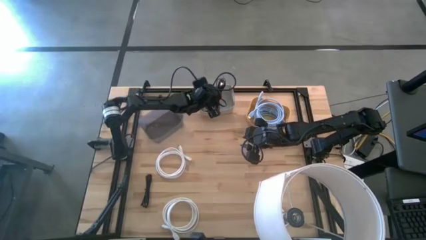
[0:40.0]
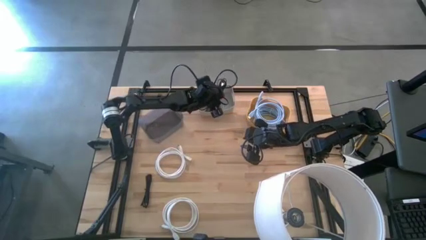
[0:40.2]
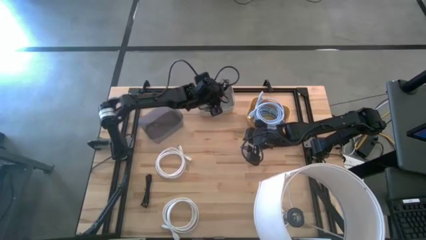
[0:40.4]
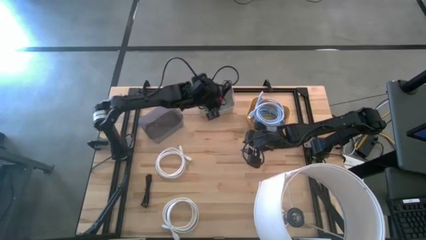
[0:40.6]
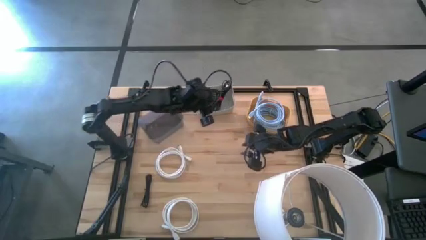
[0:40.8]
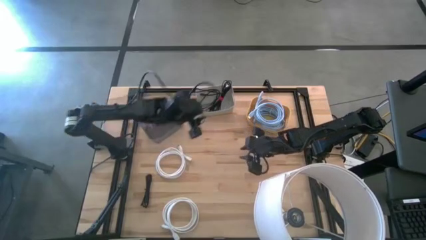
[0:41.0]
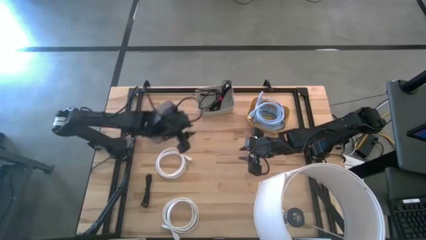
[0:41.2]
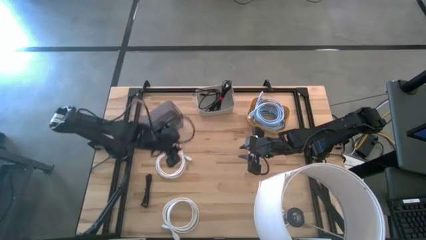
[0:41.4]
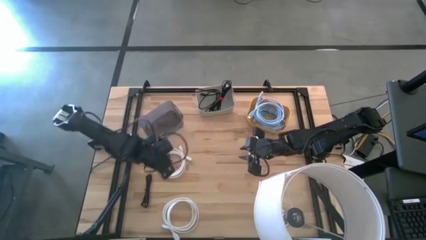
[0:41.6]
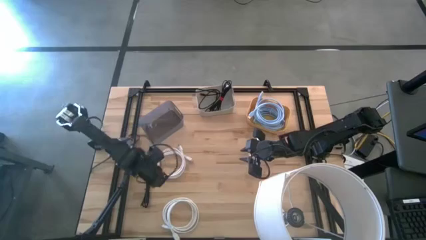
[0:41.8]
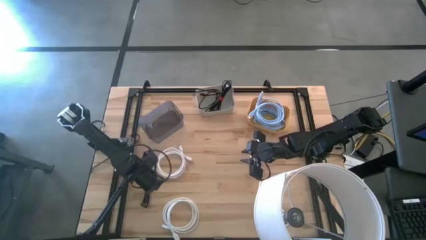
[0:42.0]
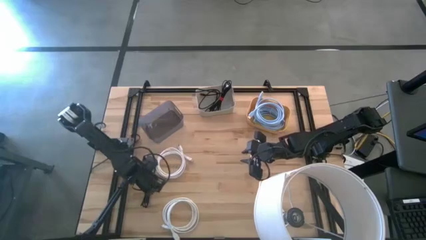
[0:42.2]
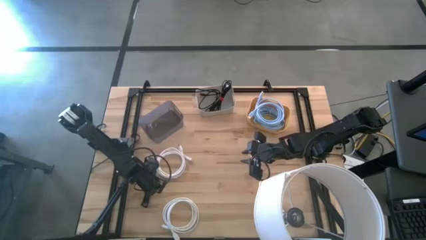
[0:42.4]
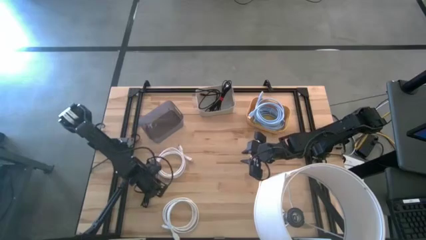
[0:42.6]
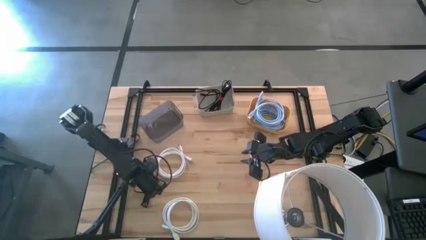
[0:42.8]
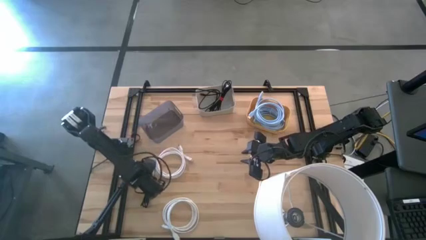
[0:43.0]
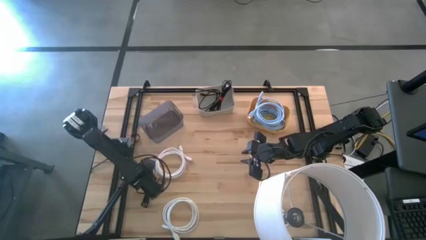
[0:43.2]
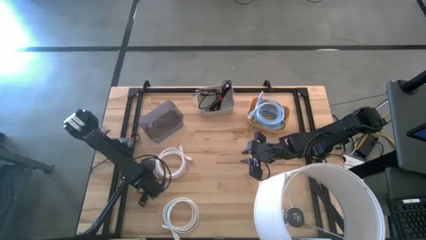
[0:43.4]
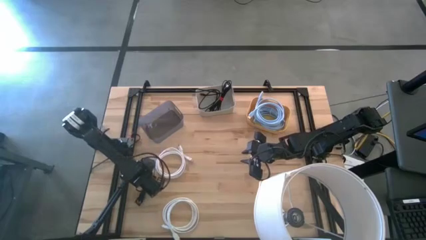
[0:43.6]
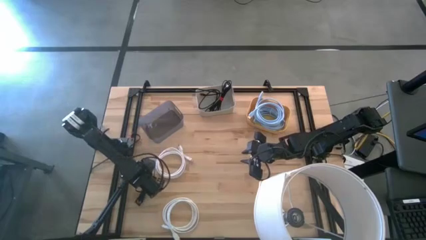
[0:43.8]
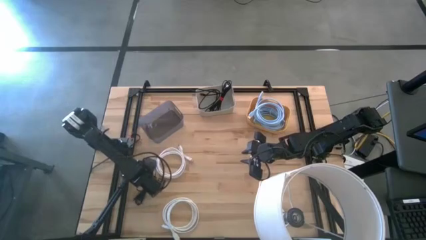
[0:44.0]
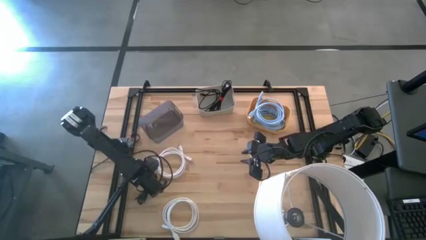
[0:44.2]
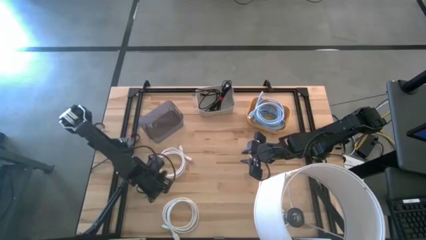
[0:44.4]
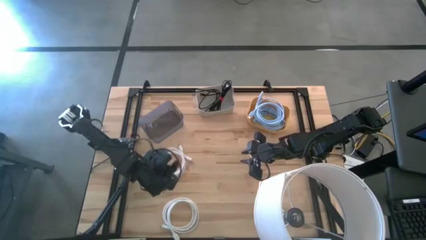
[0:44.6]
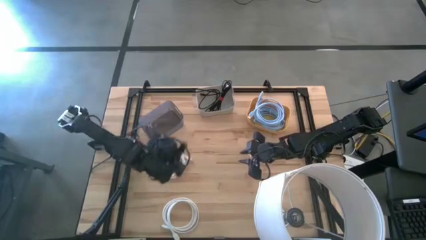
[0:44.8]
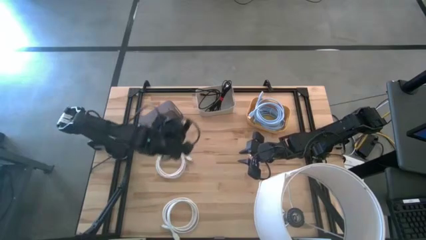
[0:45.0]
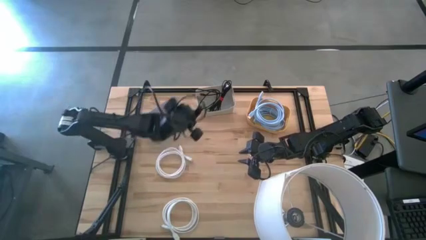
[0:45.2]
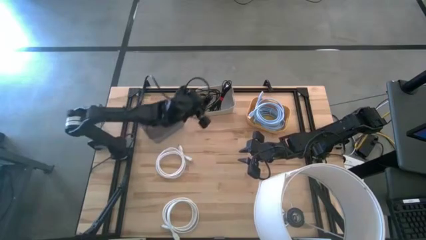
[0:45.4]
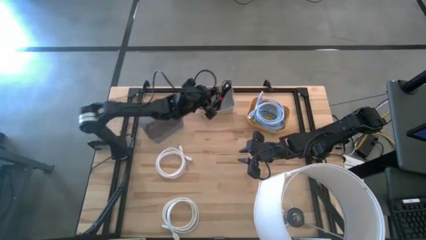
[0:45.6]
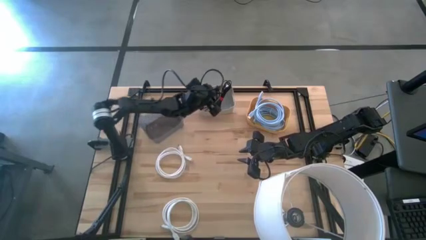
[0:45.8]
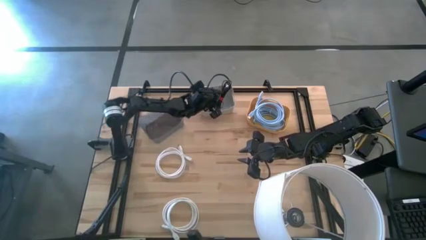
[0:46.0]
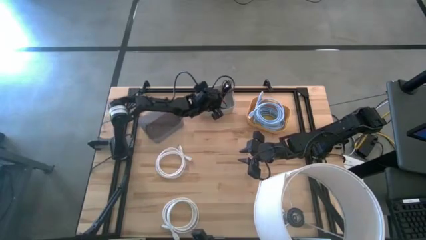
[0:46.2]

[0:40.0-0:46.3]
Task: Pick & Place USB Port
Put the black usb cable into the white bin

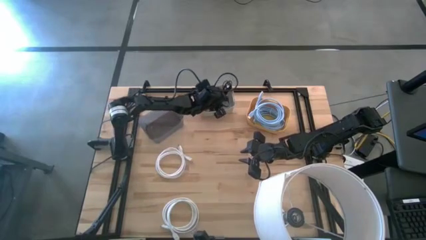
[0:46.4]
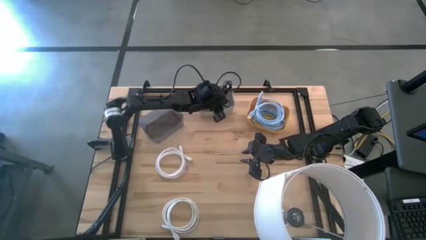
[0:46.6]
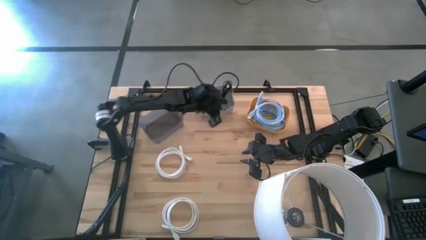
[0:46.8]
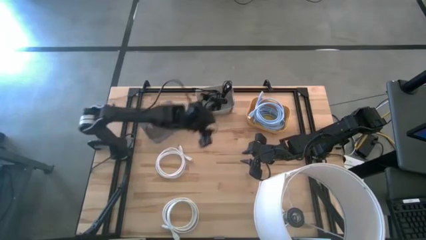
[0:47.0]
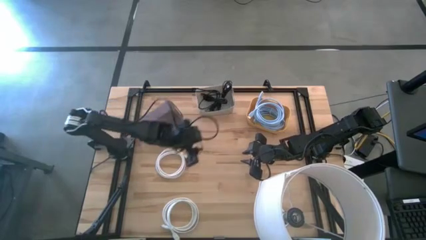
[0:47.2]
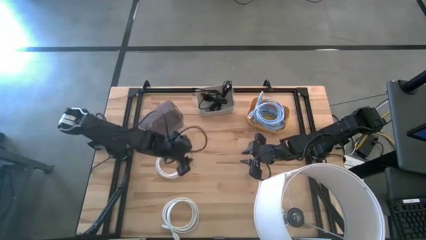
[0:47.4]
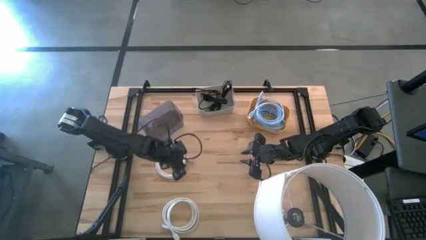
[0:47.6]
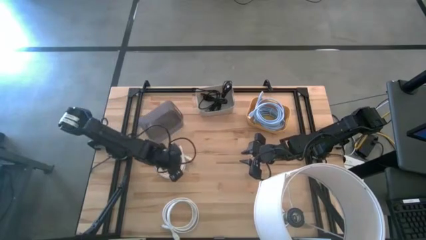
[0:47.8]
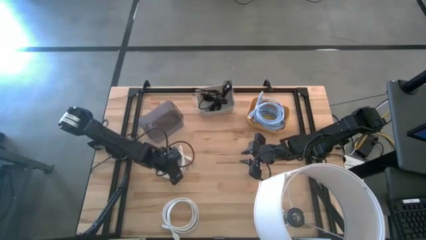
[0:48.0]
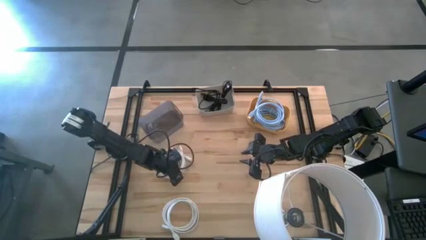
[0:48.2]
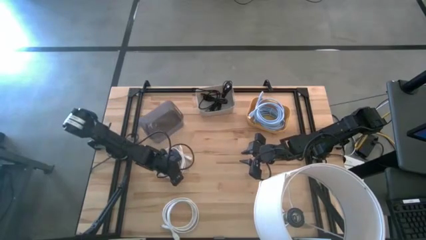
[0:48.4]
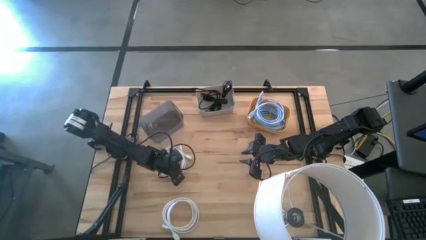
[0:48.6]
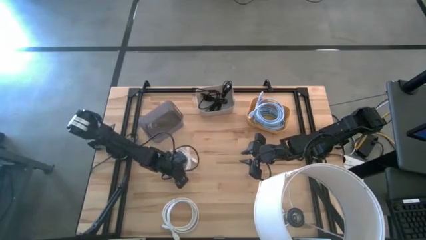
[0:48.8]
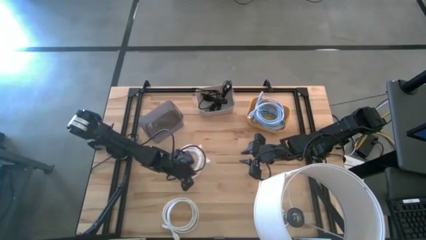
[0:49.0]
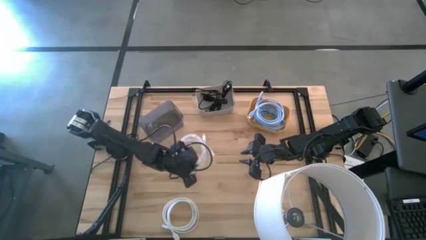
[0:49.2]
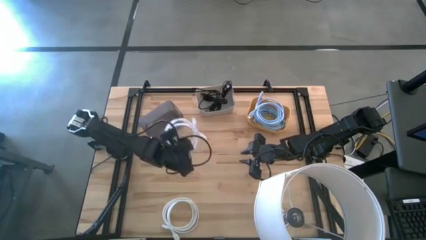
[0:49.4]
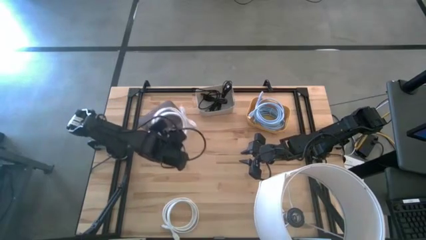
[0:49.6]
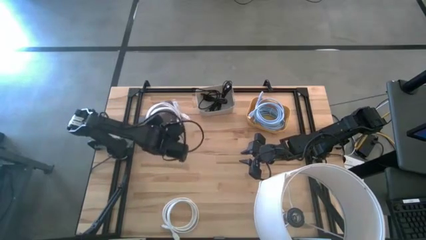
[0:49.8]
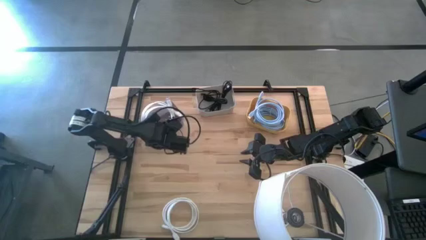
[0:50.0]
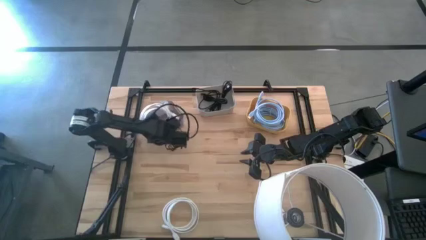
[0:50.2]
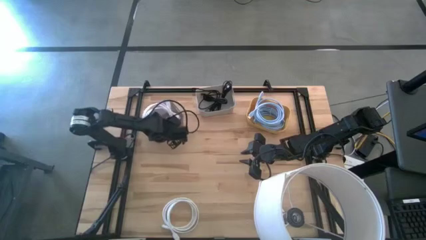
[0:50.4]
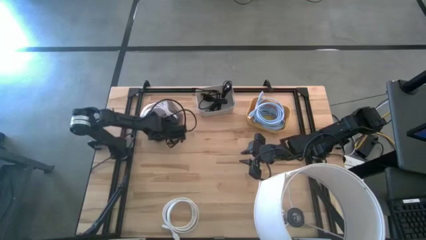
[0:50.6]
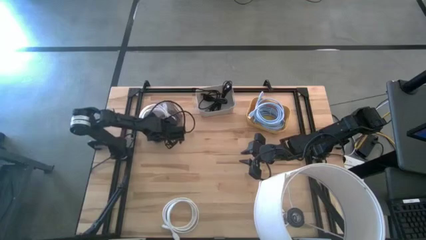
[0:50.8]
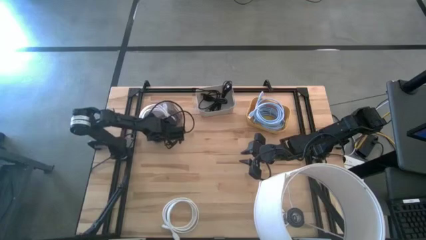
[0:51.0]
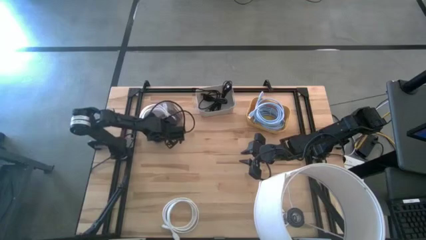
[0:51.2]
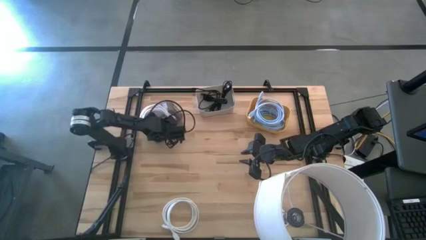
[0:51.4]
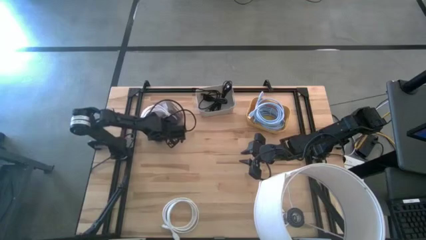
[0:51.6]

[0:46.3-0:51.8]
Put the top white hdmi cable into the black bin

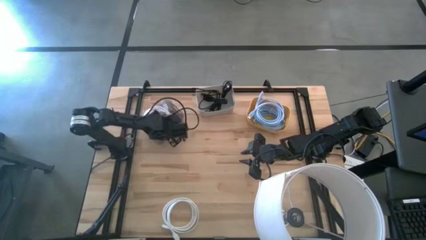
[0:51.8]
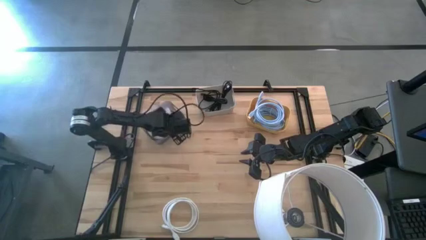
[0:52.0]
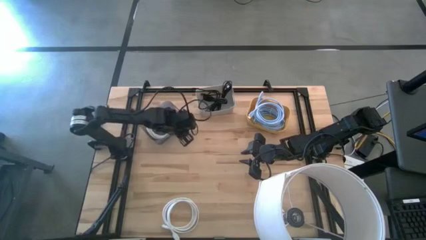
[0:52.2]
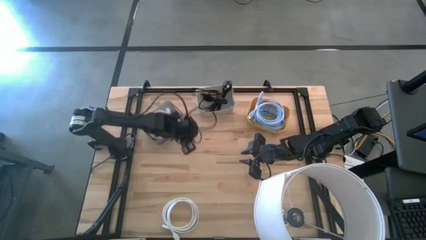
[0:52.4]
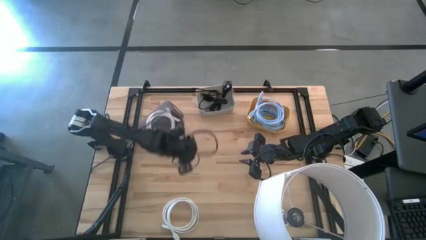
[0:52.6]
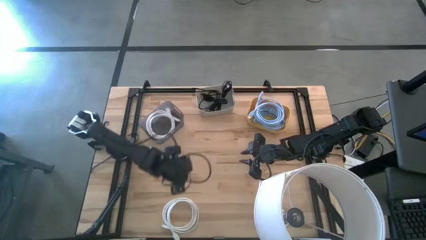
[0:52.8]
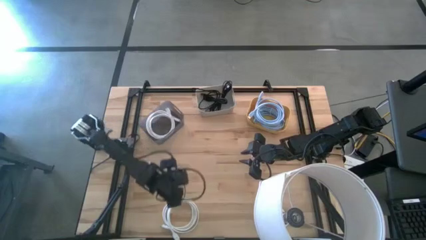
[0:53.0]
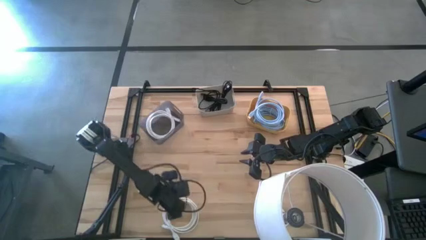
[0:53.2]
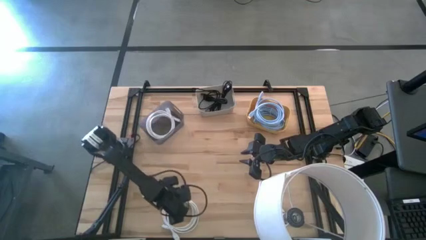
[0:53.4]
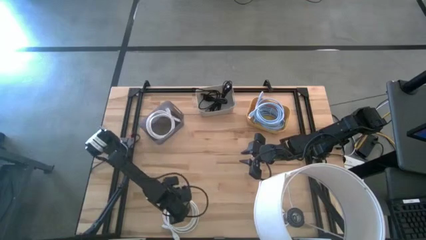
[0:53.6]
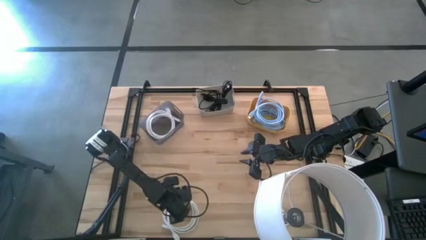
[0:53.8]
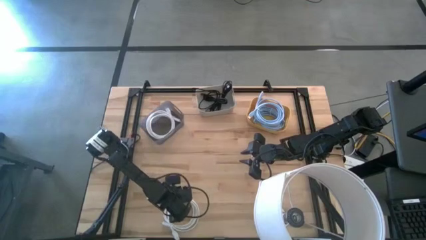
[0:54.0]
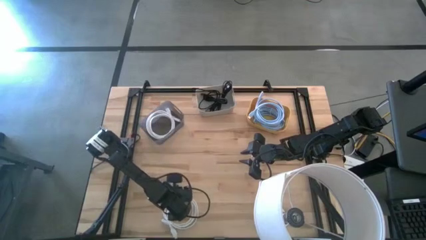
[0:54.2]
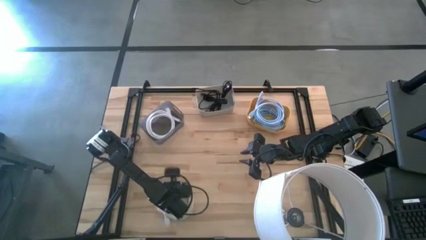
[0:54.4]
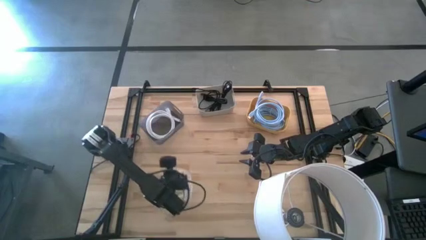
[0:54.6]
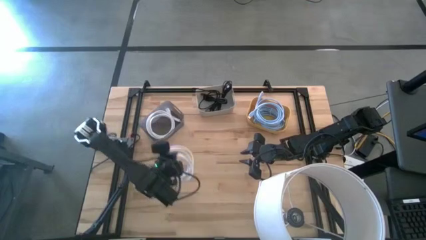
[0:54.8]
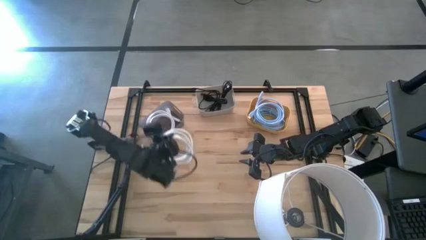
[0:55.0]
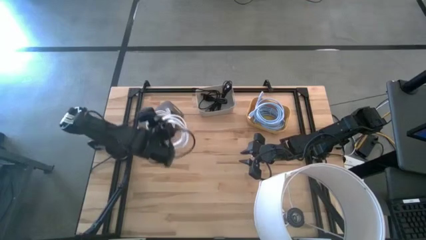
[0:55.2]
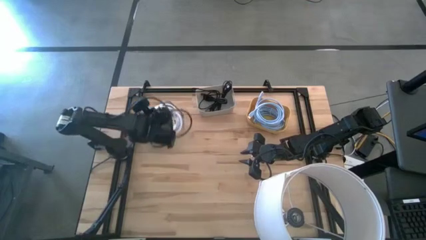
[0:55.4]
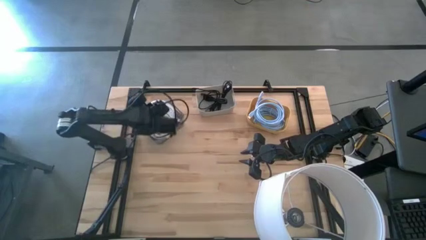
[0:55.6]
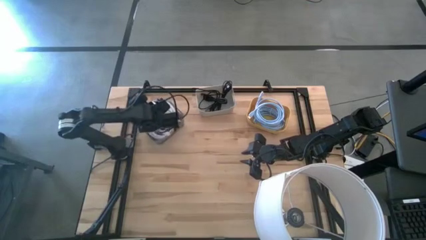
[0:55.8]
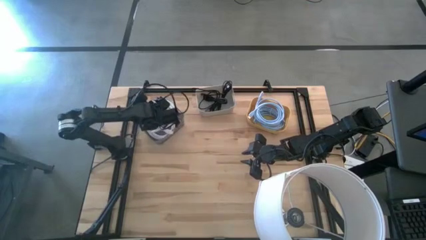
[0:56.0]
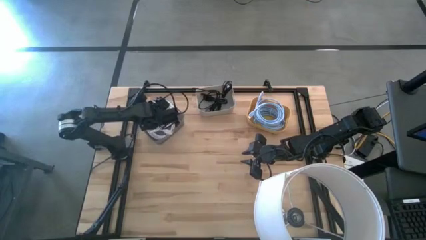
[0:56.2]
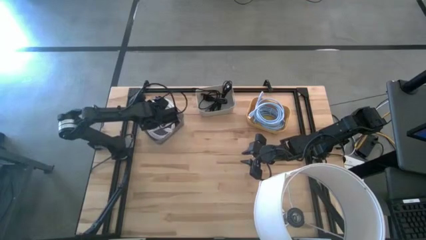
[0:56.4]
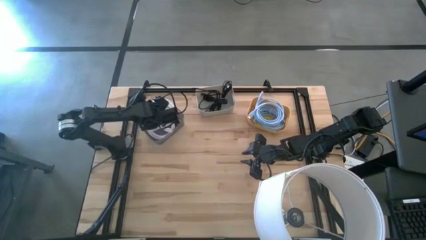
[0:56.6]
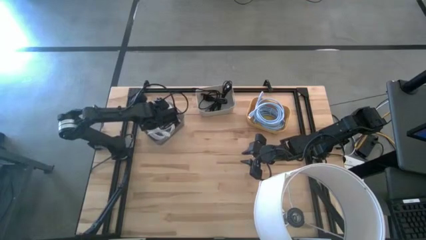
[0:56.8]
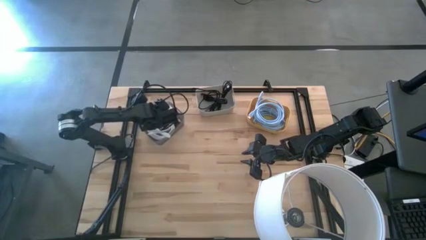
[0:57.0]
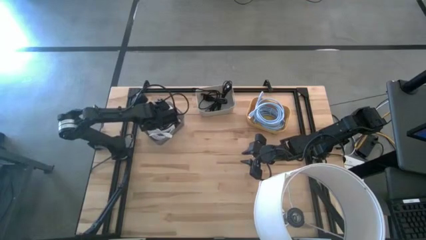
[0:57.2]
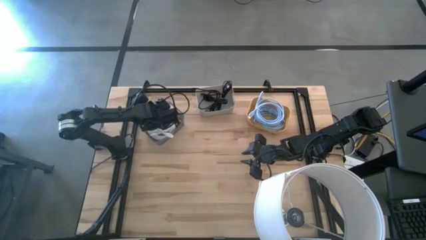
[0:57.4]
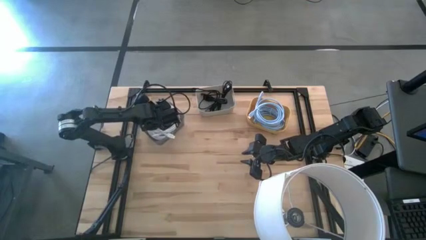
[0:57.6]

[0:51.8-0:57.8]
Put the white hdmi cable into the black bin
